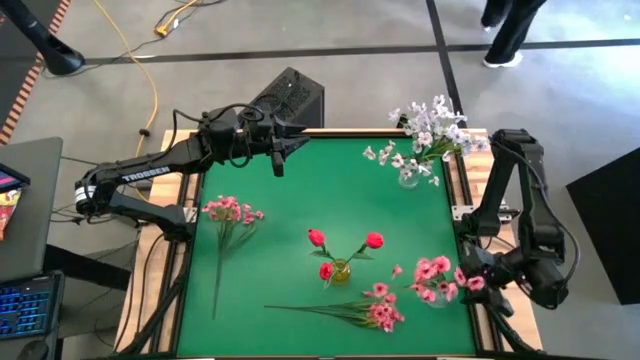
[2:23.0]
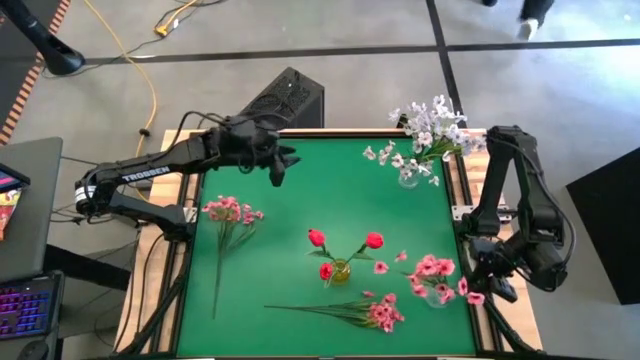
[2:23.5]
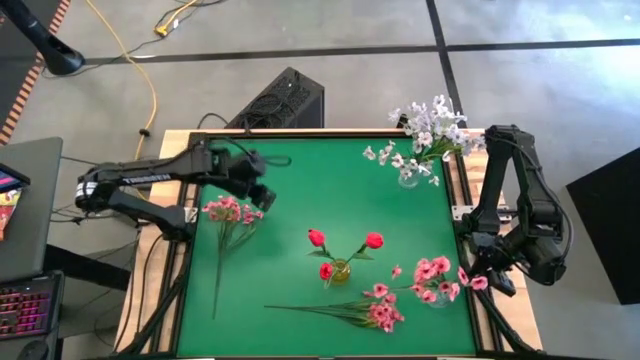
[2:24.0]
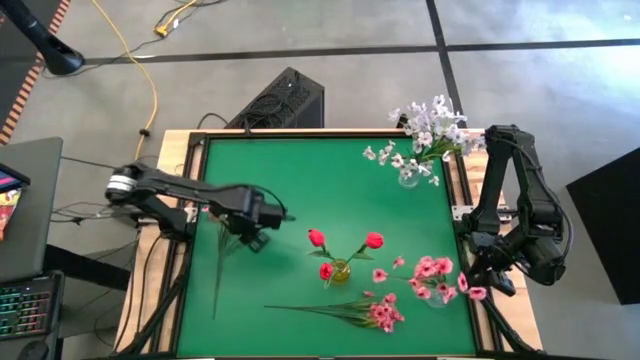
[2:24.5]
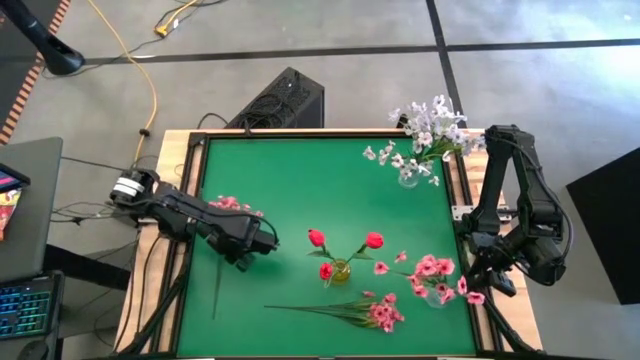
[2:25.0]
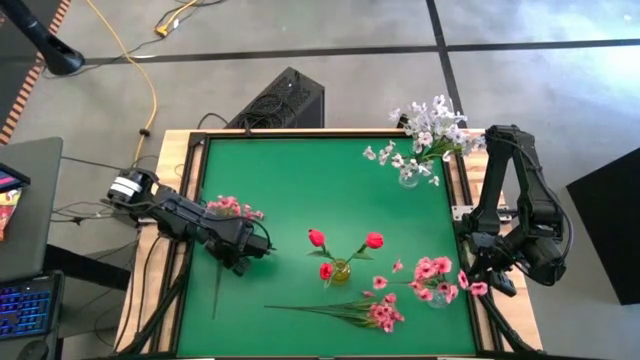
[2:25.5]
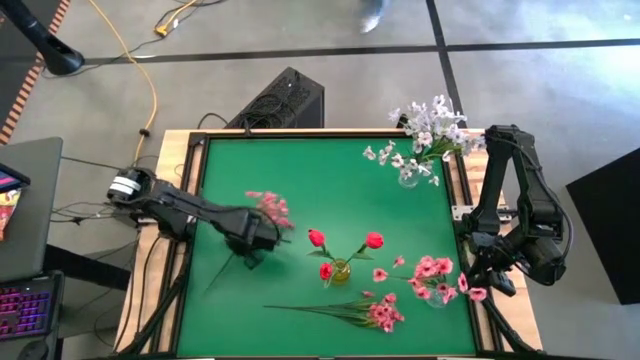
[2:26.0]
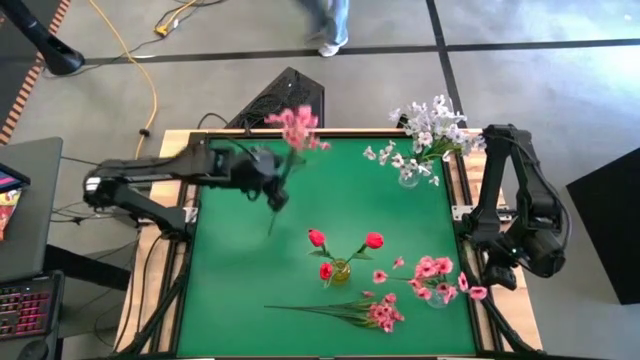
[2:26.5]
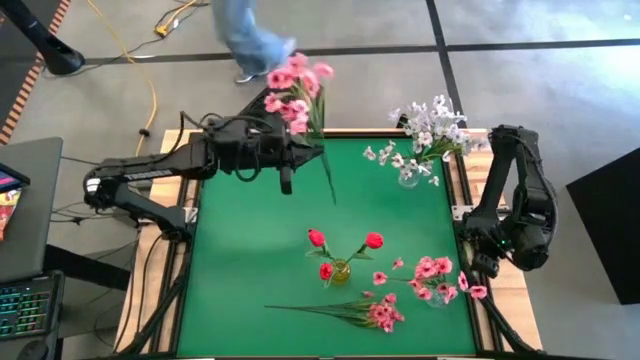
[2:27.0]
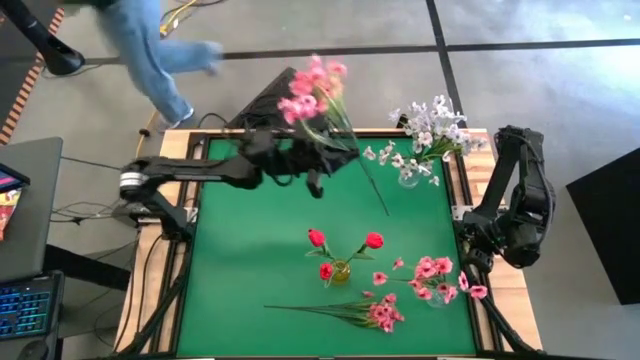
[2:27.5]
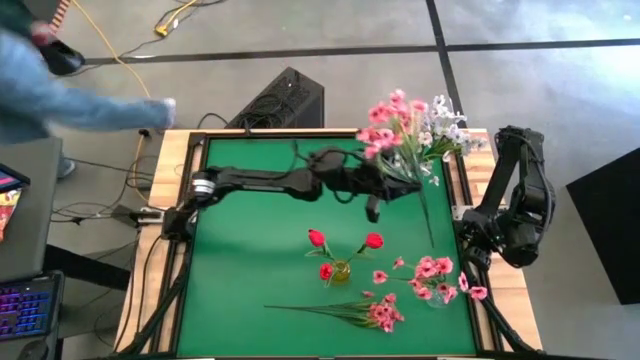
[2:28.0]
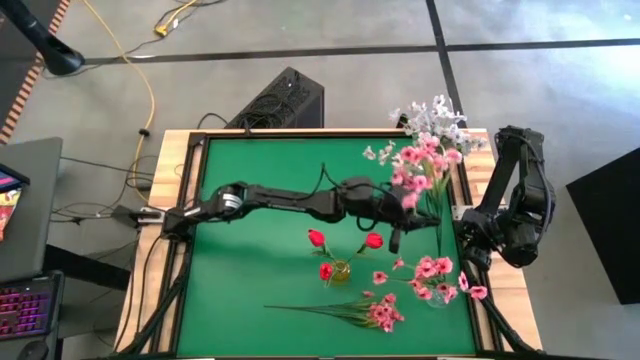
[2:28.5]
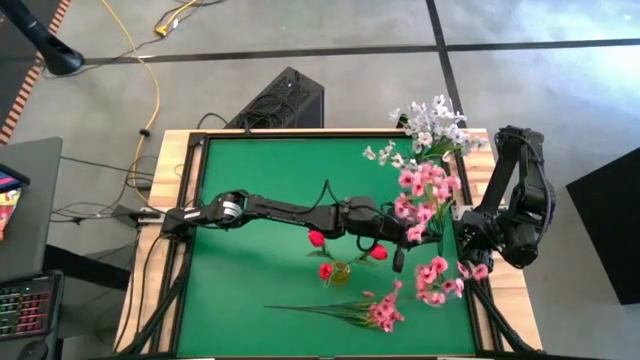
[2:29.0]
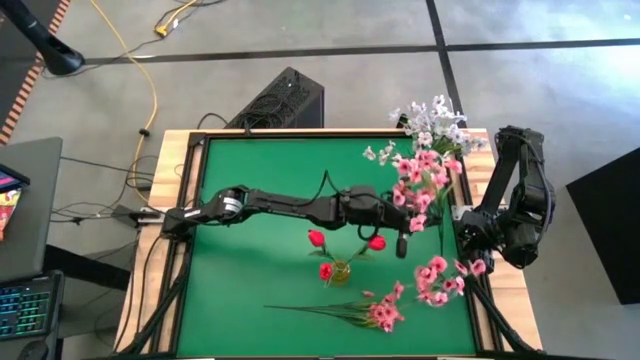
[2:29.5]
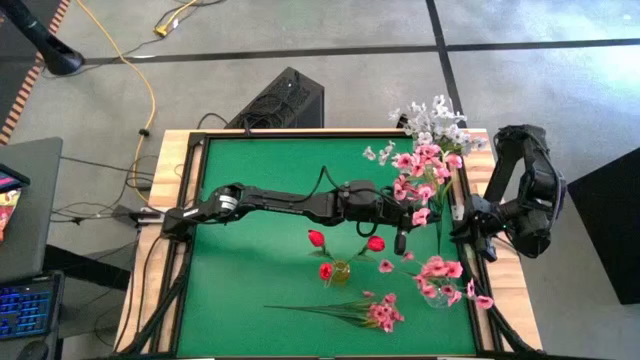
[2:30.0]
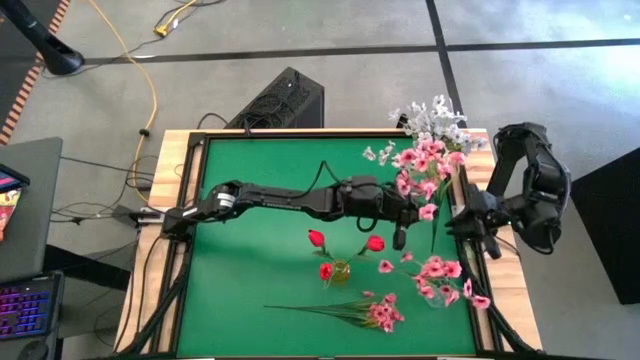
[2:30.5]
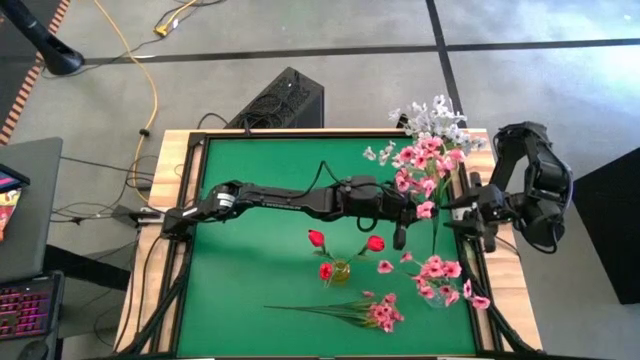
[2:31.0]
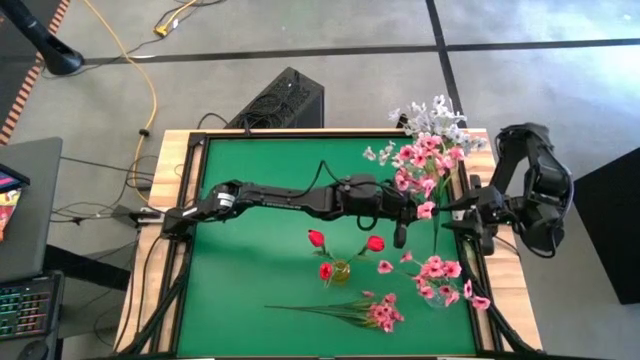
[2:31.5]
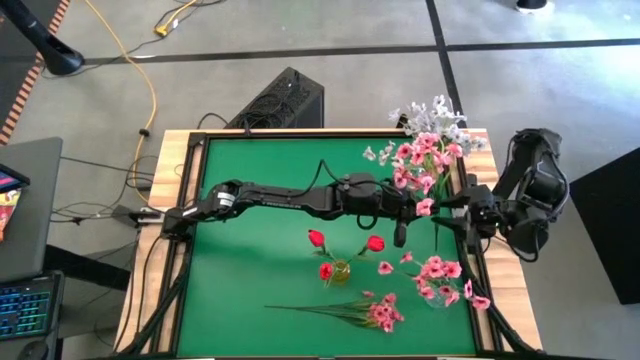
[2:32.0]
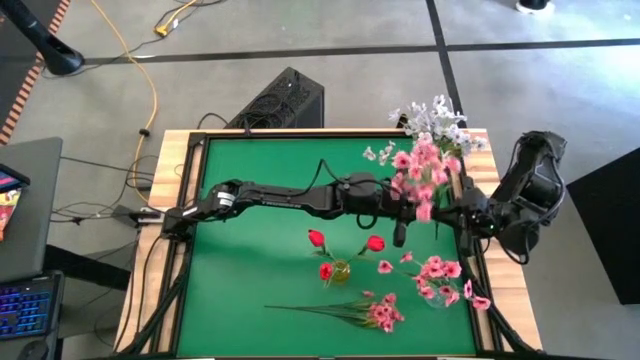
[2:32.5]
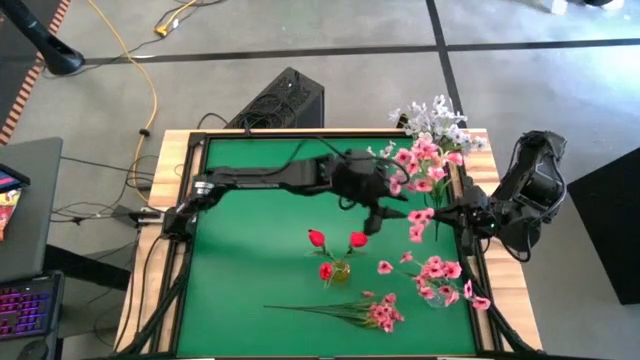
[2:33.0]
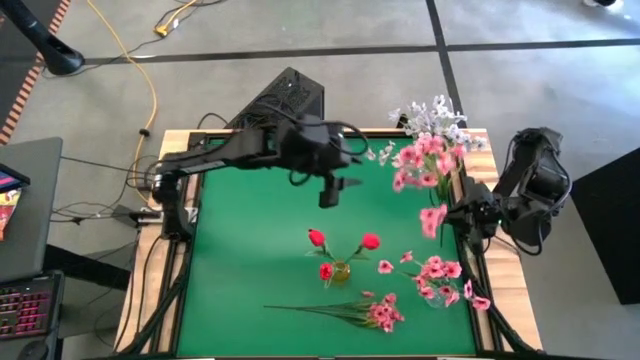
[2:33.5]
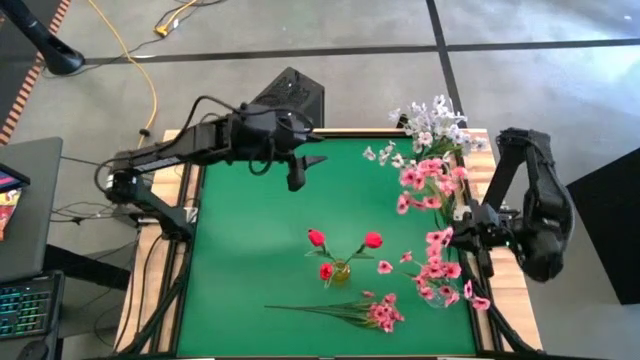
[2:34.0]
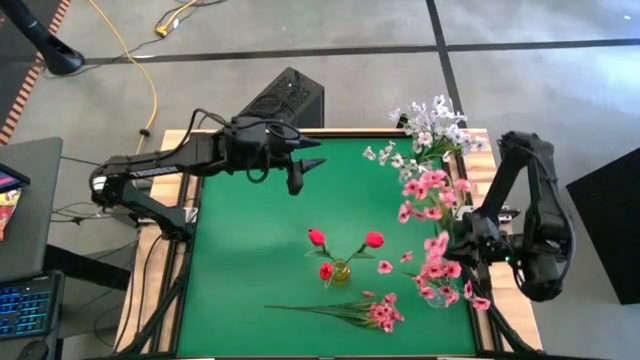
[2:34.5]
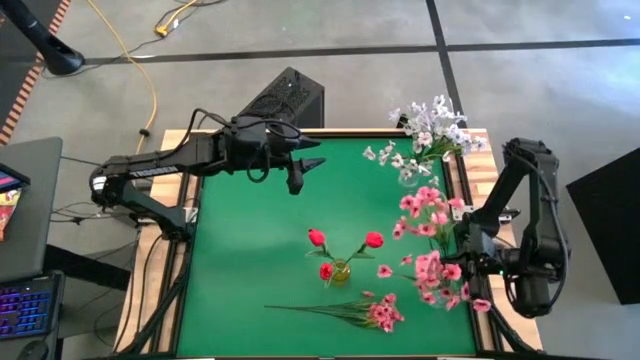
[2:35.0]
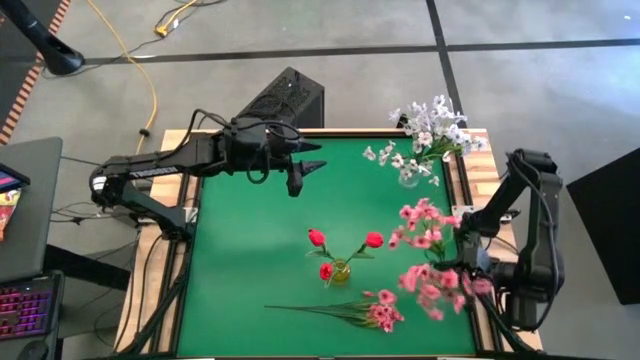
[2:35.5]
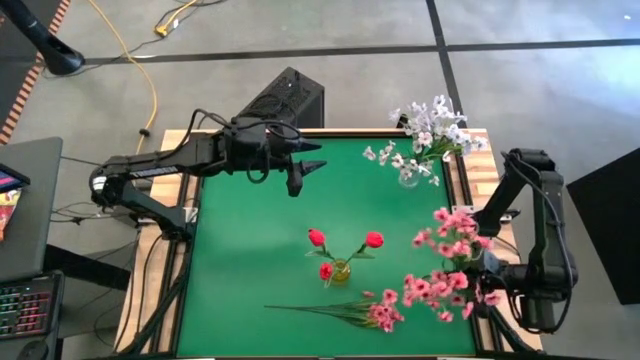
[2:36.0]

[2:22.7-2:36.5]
Task: Sort flowers into vase by color
Put the left pink flowers into the bottom transparent vase

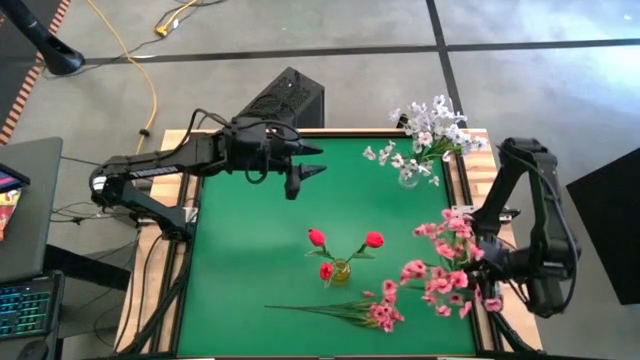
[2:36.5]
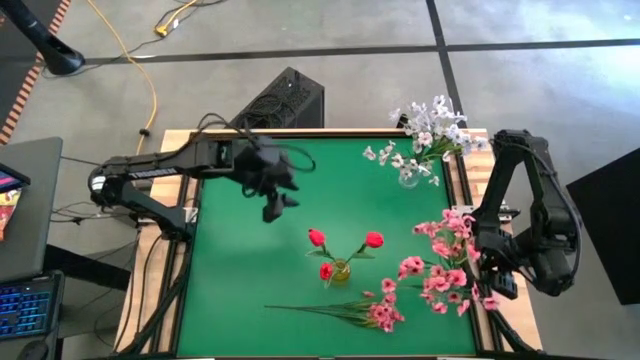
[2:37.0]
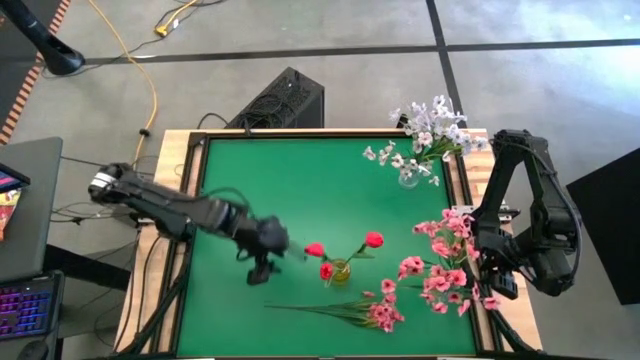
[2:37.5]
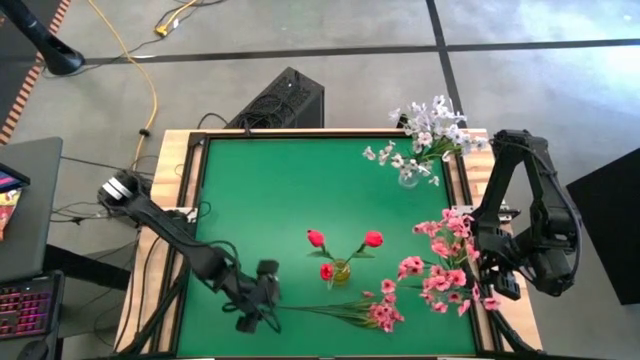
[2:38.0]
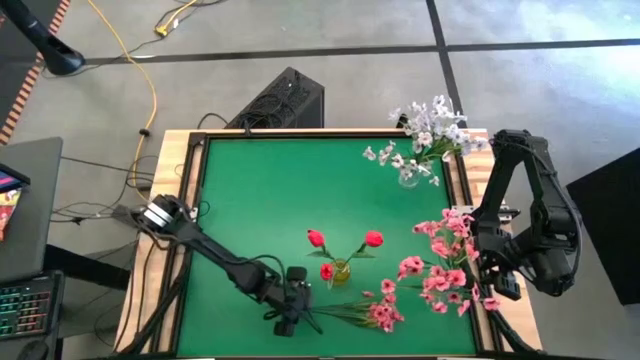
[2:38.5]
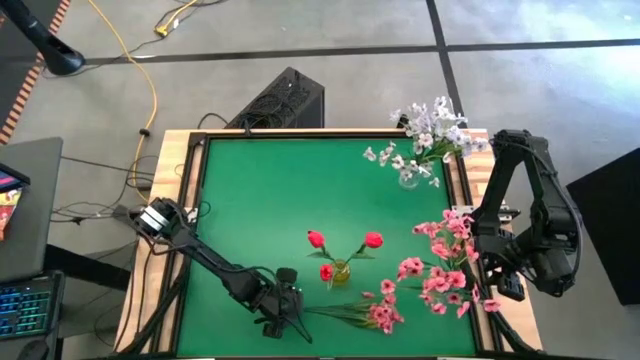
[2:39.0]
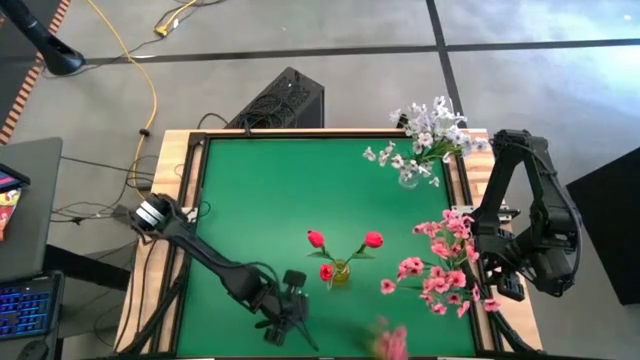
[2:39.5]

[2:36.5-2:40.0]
Put the bottom middle pink flowers into the transparent vase

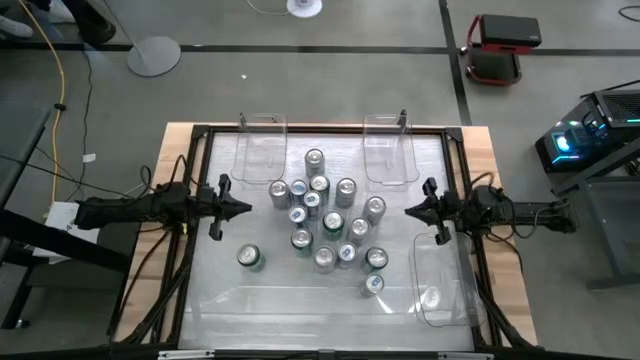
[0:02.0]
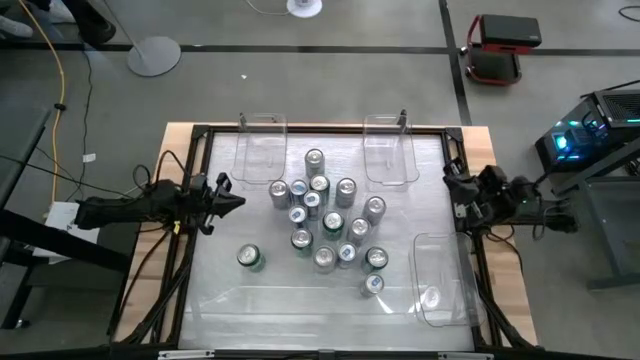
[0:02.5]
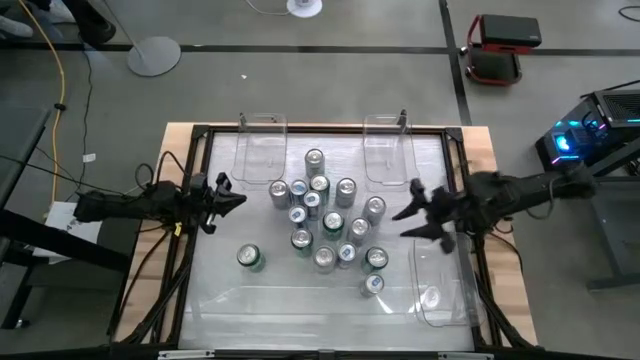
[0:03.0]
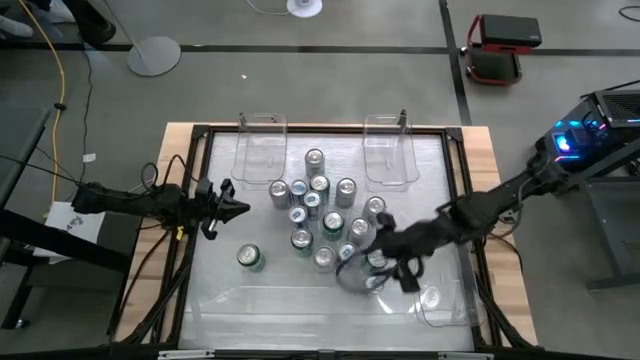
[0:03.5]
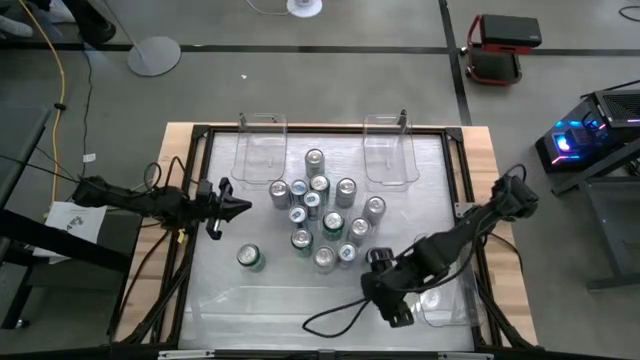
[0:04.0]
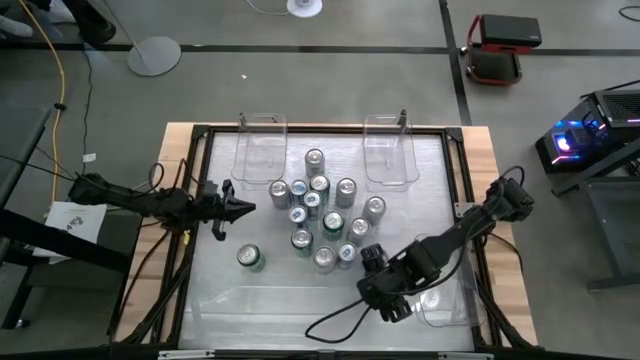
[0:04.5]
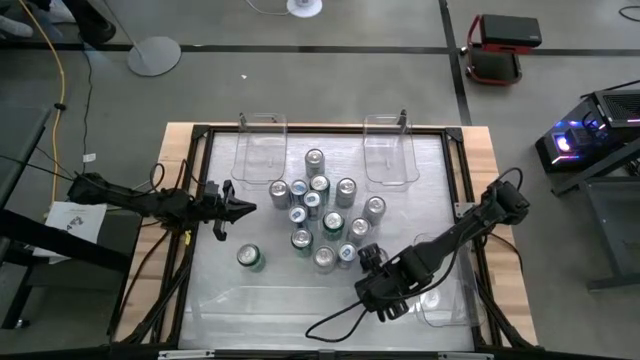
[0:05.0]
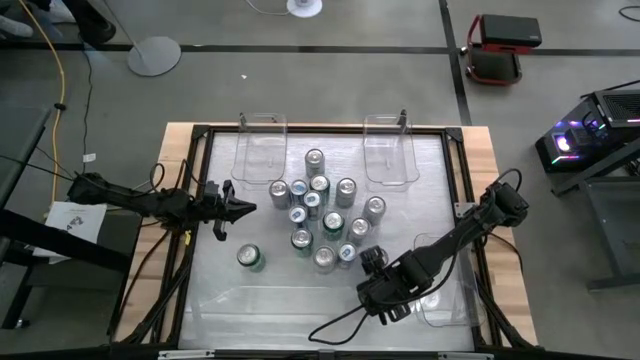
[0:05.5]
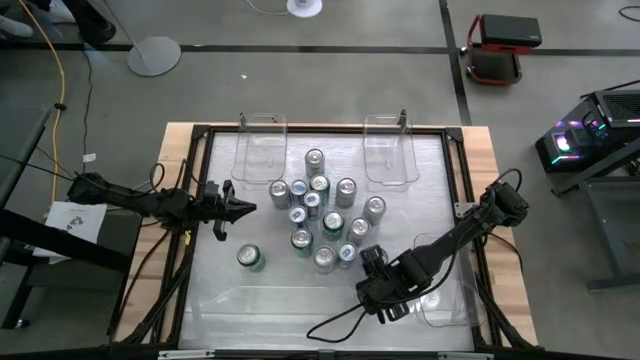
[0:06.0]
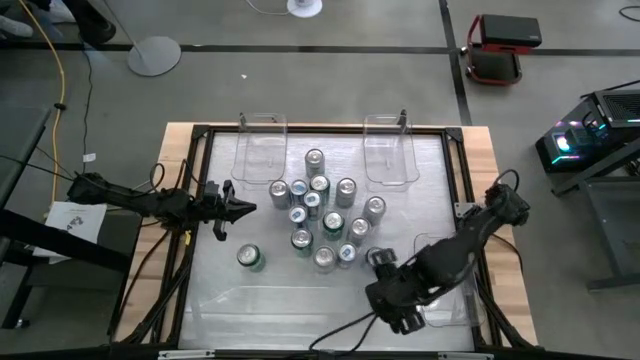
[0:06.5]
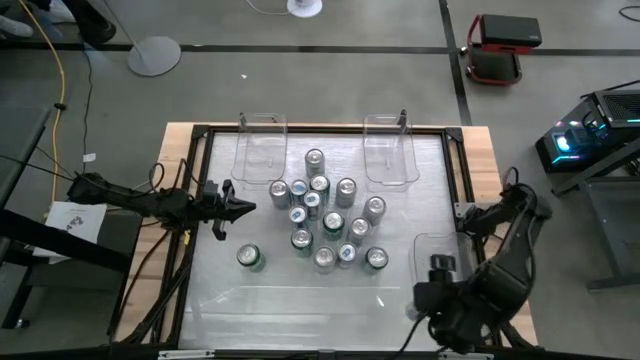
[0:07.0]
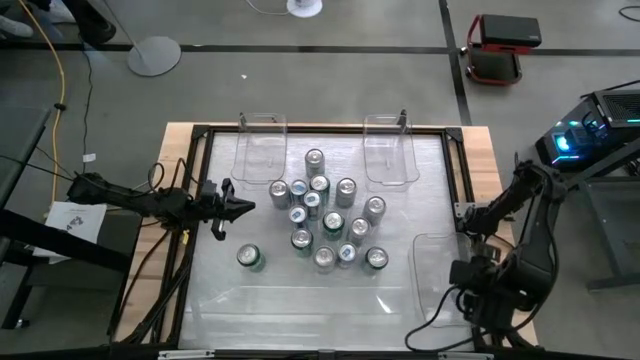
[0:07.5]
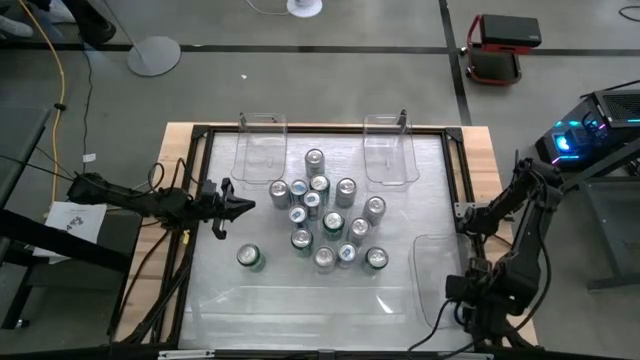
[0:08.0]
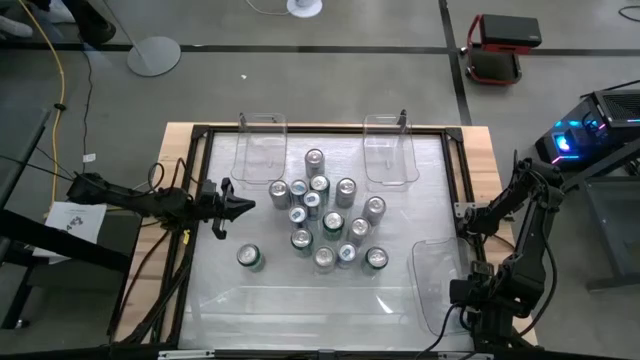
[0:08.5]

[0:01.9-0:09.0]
Task: Sort soda cans
Put the blue soda can into the bottom right transparent bin
